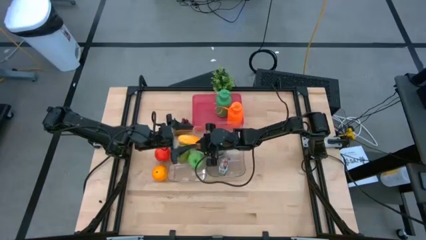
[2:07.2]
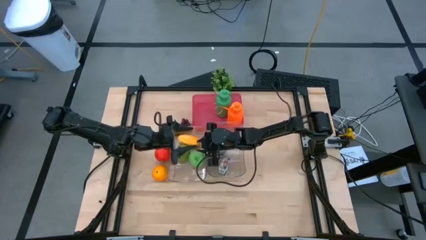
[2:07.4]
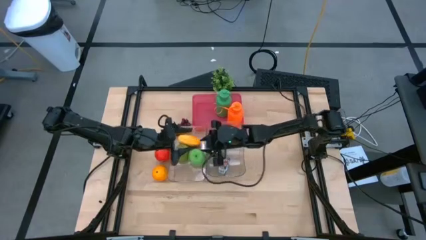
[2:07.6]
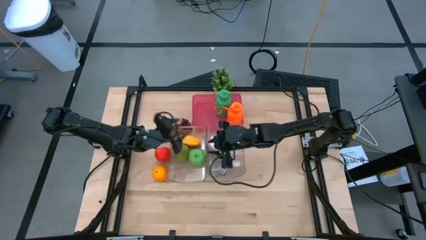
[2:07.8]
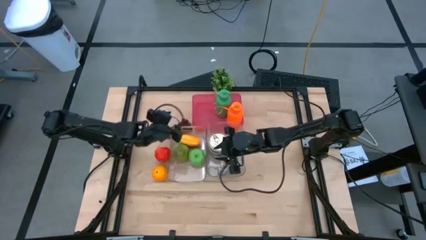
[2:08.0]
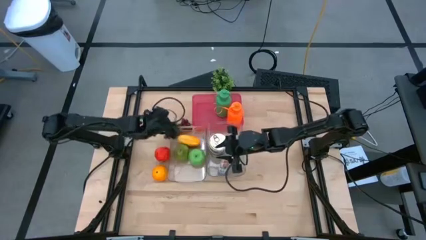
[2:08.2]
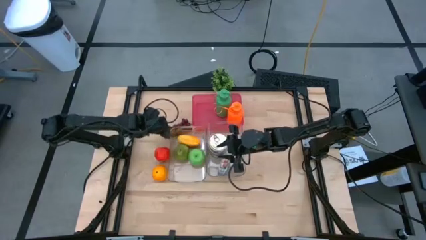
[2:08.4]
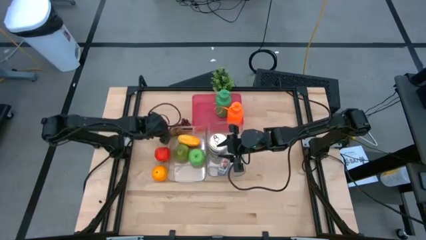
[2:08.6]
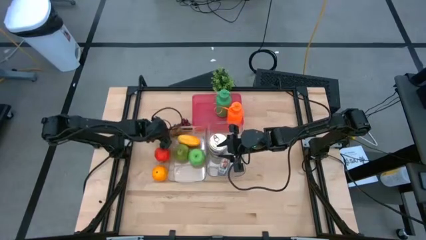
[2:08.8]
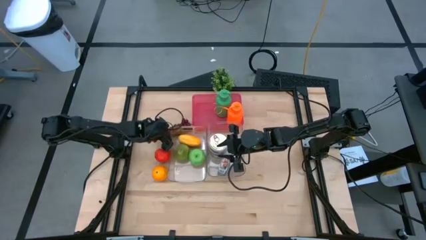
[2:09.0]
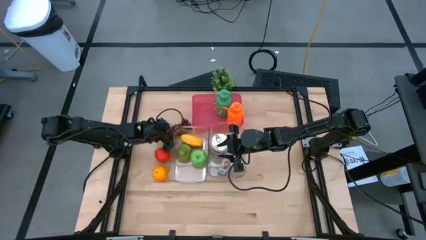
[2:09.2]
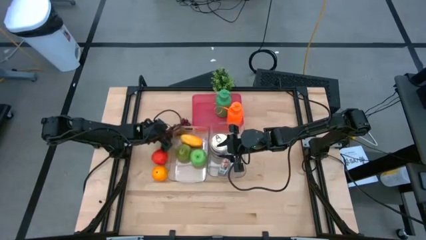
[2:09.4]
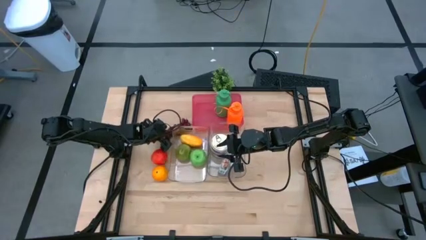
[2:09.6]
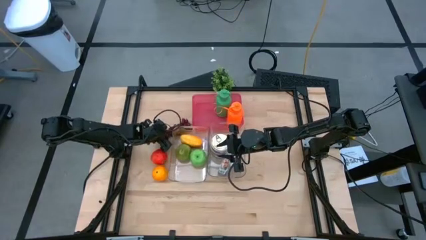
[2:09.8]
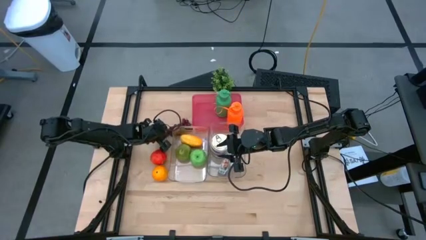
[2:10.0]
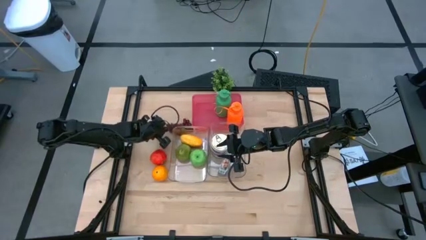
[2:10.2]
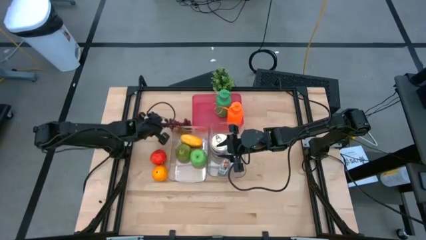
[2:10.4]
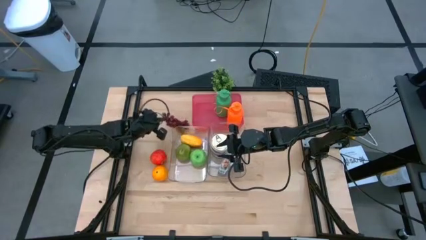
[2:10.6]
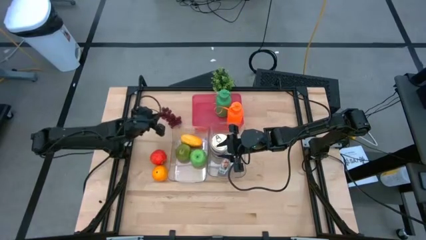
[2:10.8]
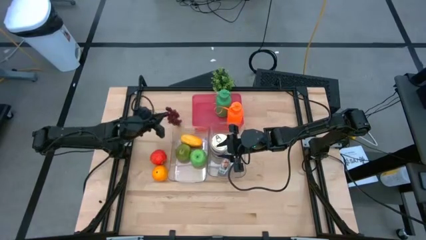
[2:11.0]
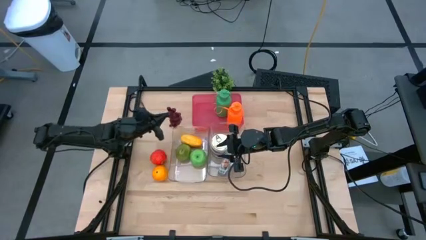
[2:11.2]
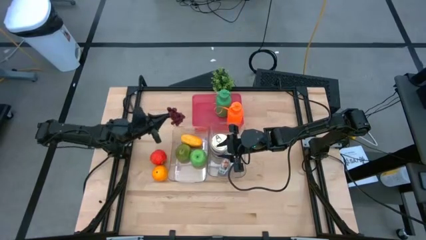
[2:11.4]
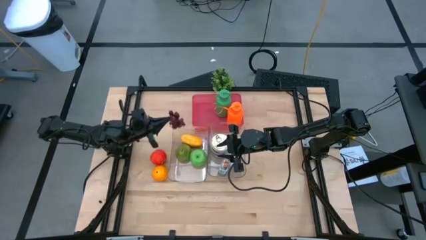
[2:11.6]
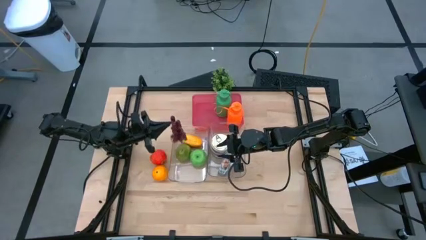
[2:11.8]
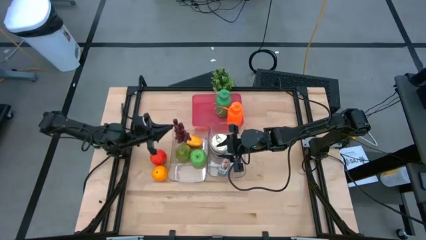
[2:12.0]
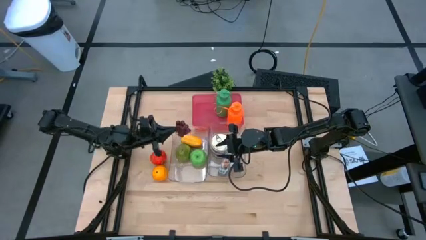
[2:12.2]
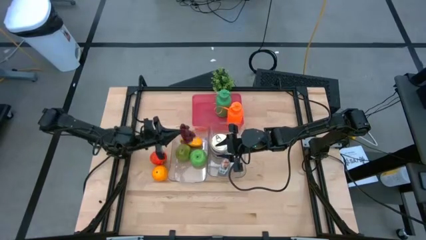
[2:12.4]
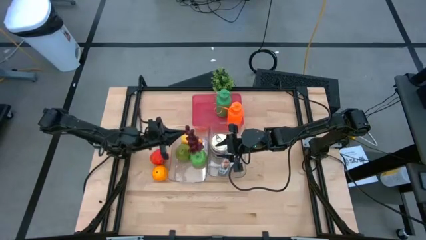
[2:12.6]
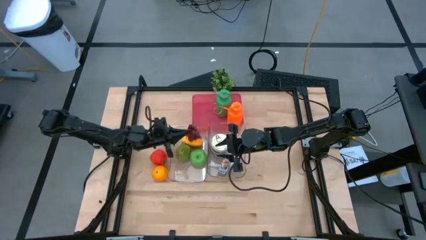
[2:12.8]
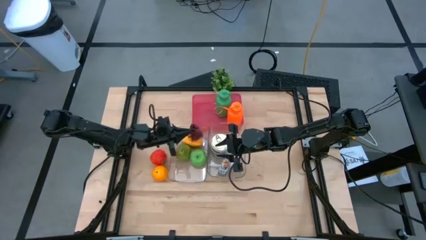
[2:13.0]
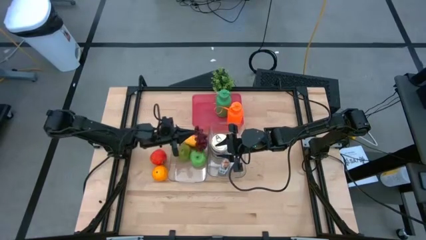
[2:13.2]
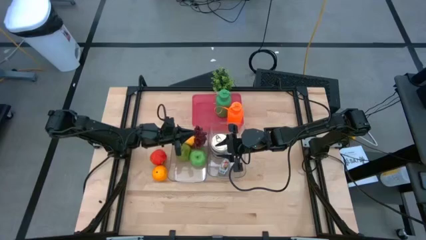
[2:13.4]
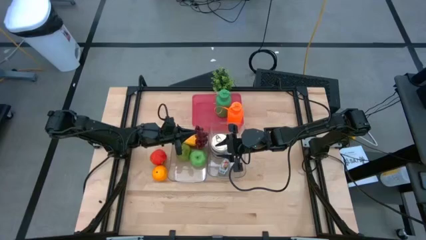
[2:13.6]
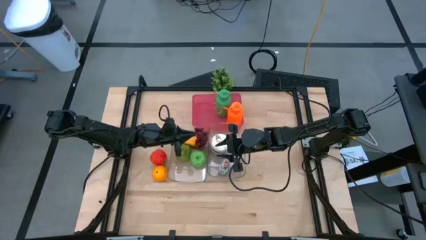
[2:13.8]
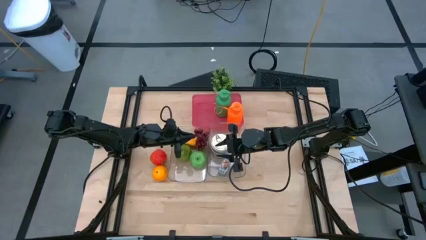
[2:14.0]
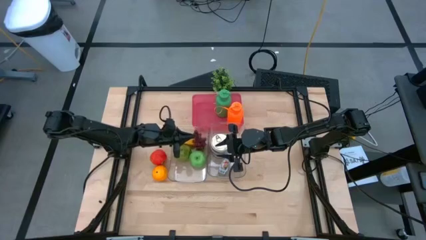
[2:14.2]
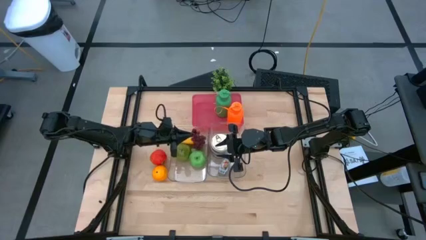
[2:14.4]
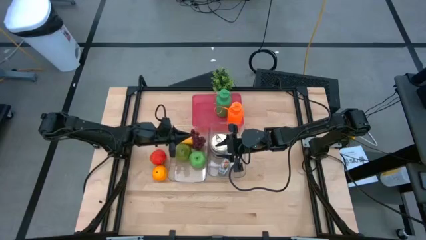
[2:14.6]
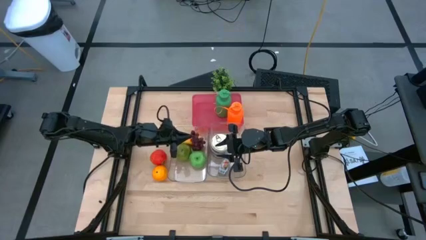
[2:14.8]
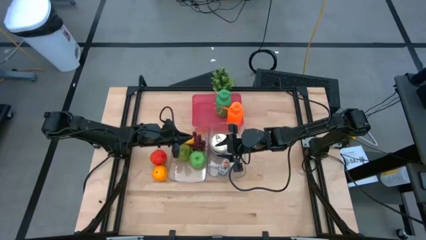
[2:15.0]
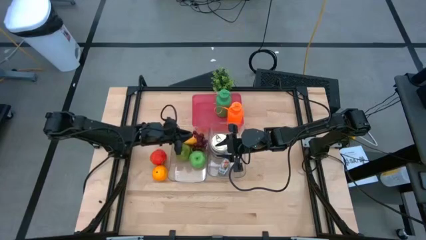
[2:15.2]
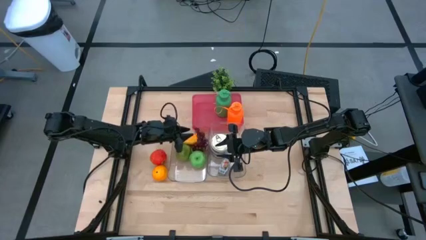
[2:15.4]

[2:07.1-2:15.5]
Task: Pick & Place Food Item
Put the red grapes into the left transparent bin

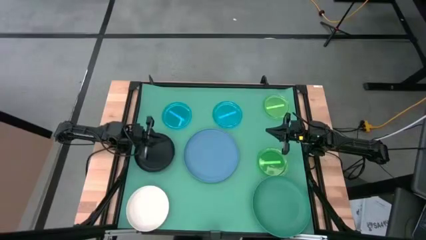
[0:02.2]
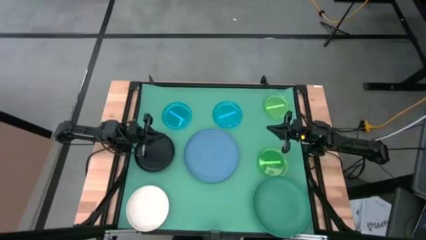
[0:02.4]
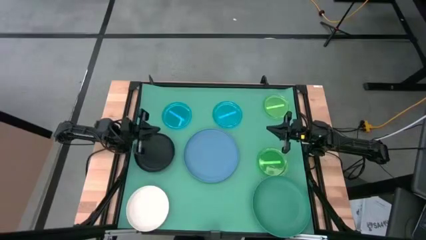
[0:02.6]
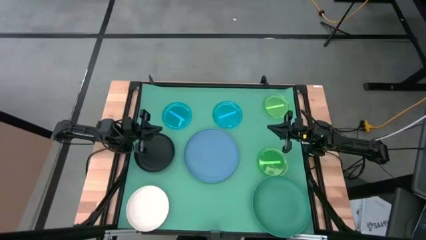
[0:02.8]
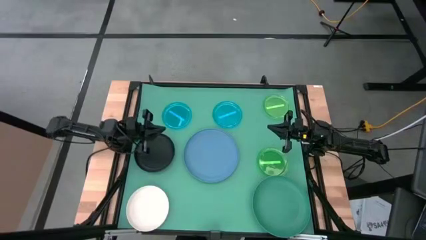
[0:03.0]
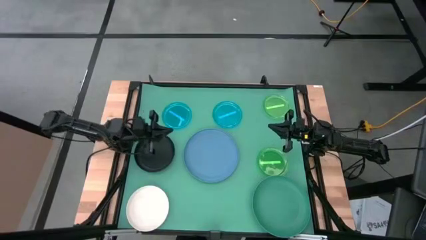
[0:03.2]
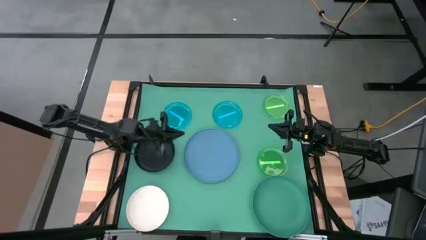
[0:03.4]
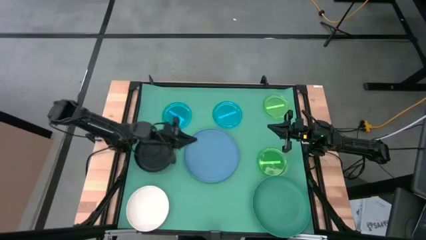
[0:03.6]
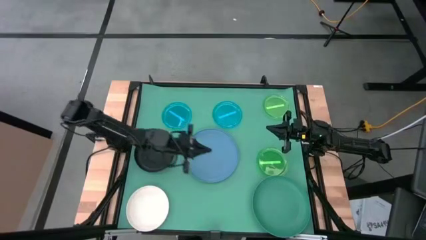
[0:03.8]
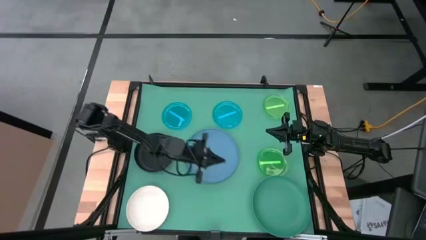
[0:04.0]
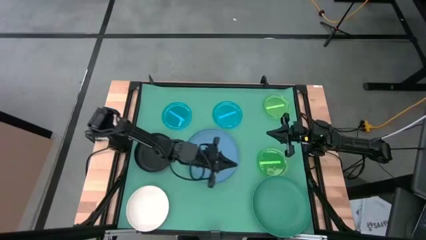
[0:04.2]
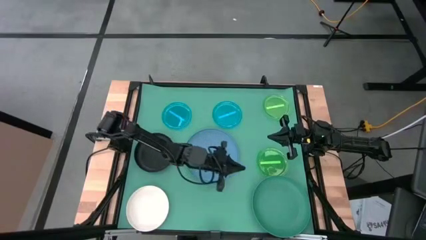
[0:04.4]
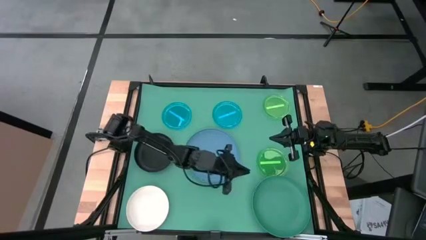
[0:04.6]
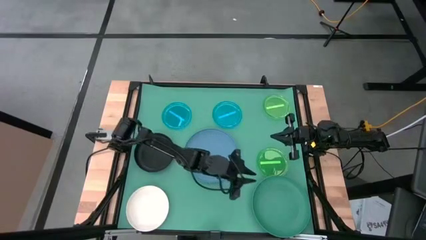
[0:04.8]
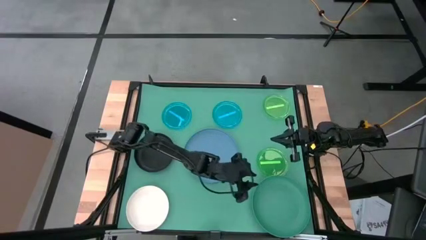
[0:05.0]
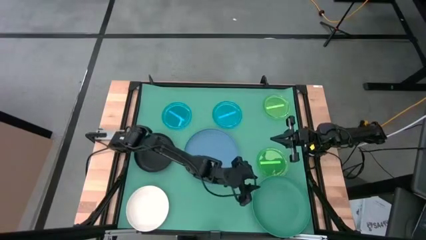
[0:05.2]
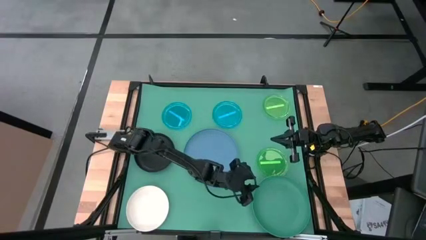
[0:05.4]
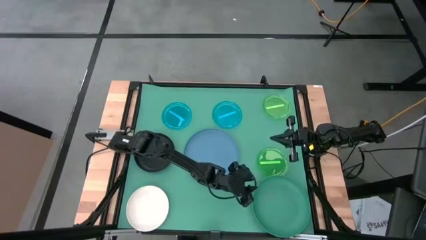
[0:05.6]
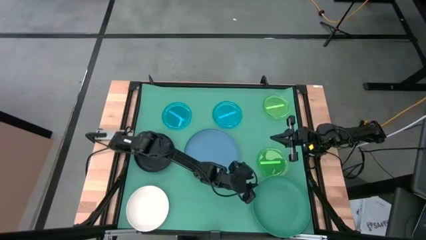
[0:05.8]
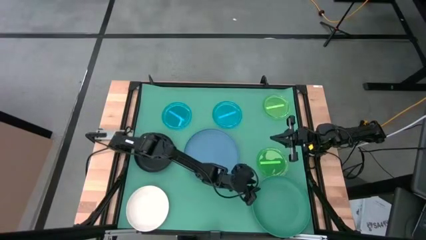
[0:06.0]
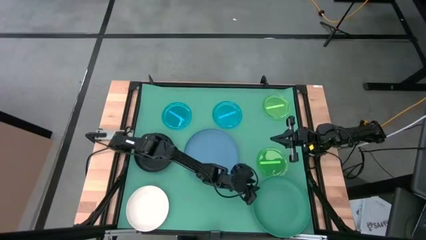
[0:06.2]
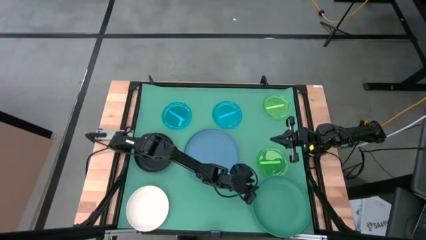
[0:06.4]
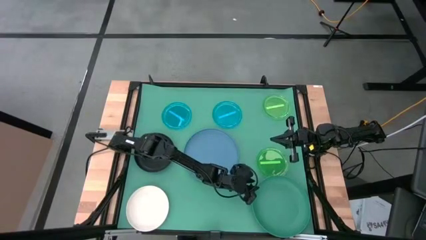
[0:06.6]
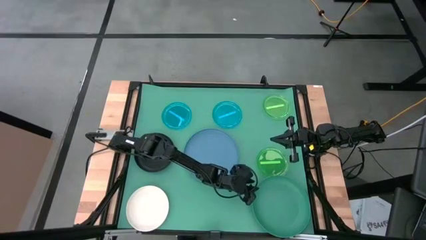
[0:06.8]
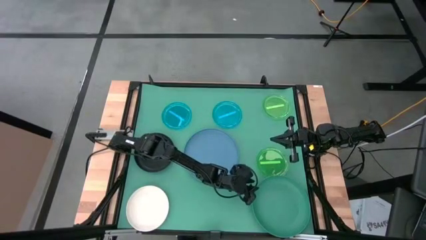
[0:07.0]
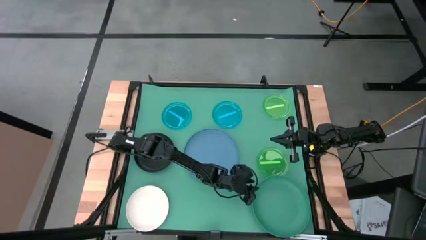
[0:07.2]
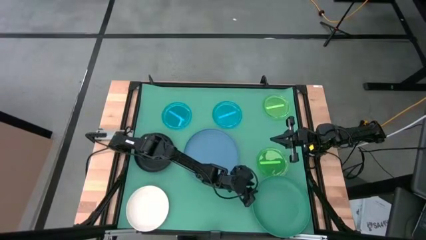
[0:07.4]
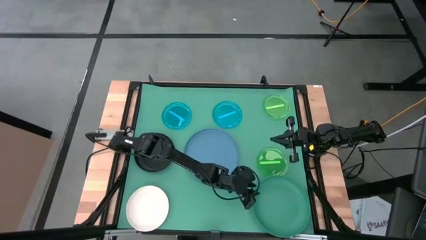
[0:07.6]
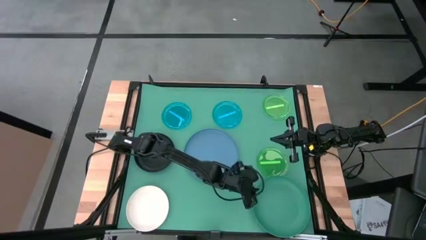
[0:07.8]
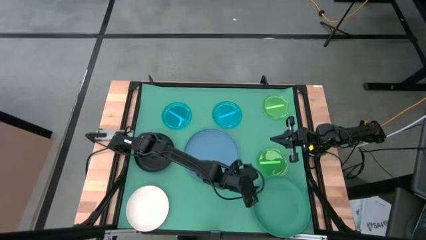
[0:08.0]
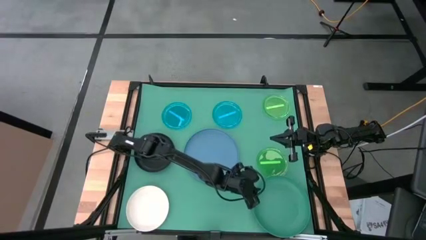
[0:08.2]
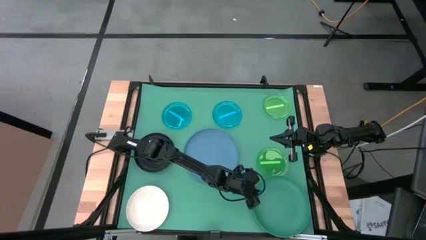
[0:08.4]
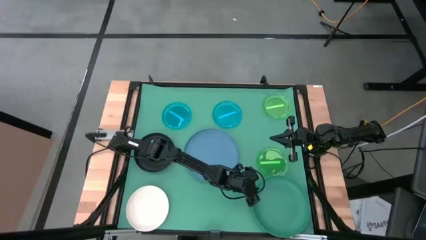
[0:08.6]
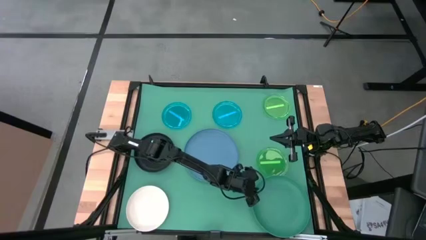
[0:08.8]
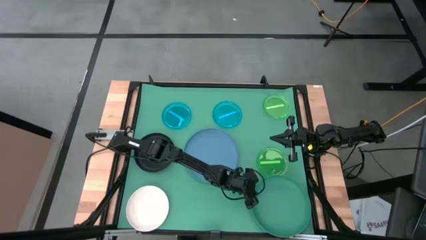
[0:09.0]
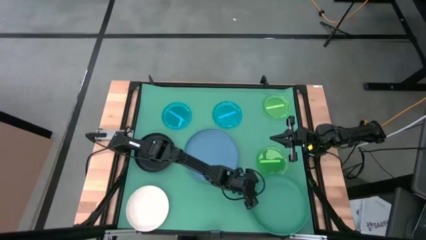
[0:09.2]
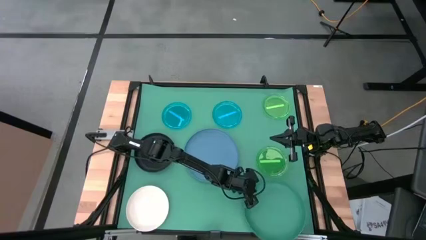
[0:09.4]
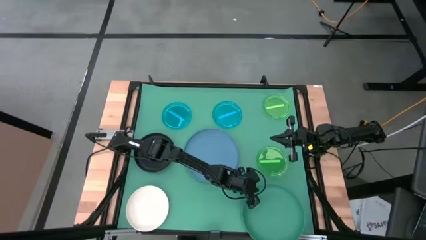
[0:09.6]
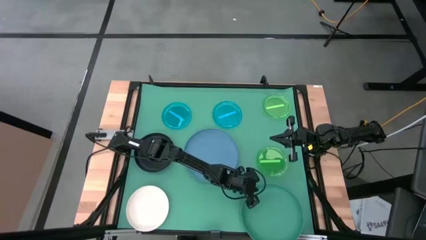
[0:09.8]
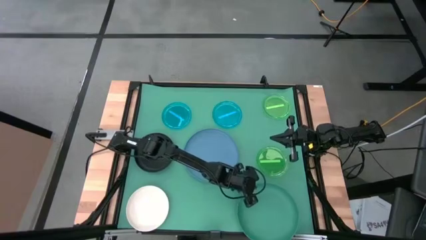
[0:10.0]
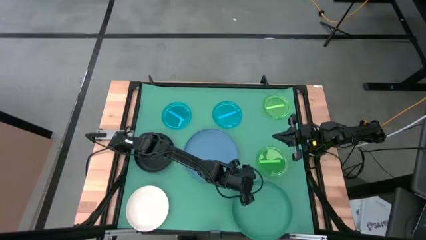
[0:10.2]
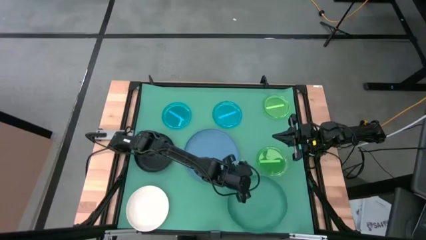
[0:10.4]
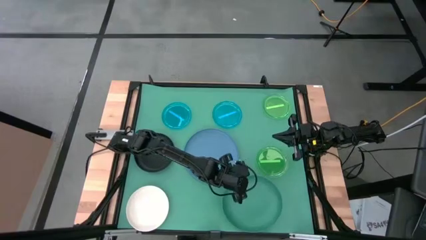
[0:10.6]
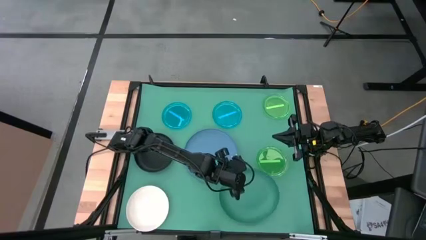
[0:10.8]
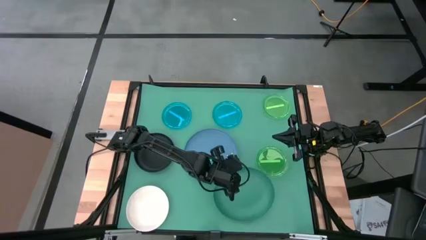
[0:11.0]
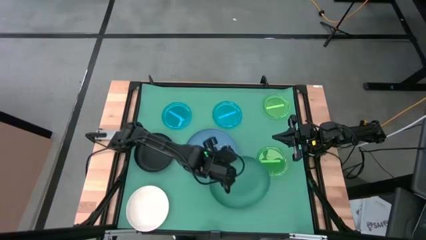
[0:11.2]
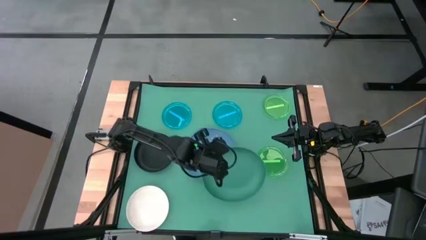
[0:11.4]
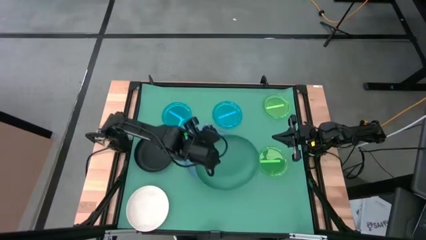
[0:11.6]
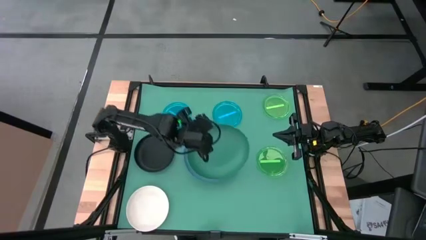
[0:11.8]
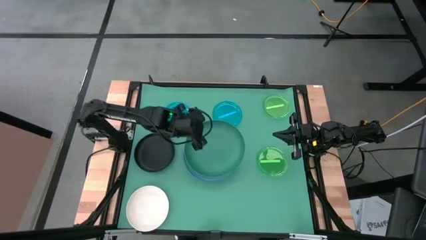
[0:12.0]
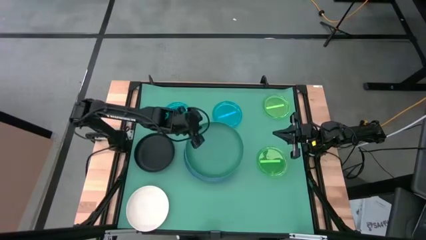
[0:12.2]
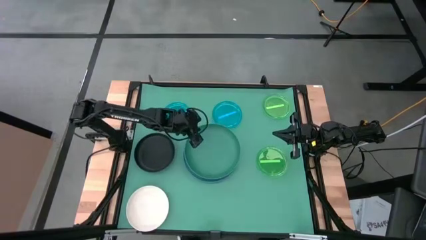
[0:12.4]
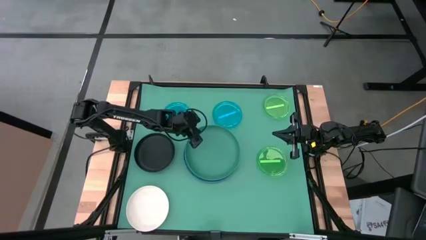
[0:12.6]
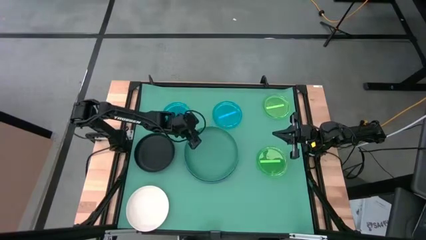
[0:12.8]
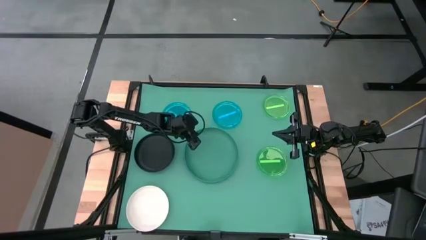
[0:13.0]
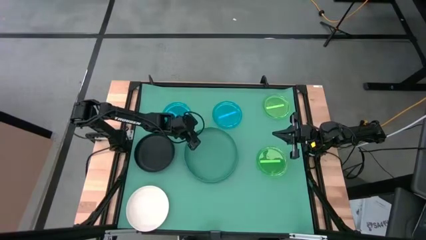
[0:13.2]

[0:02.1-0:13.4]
Task: Stack plastic plates
Stack the green plate on the light blue plate
